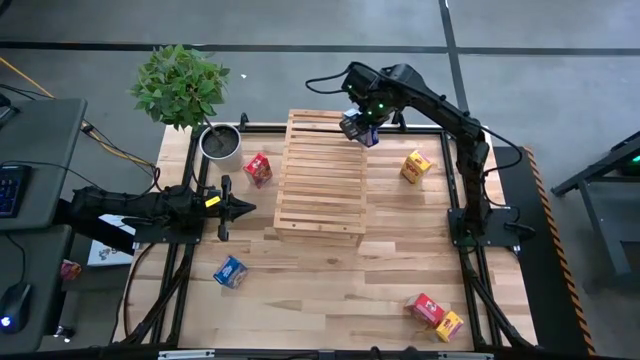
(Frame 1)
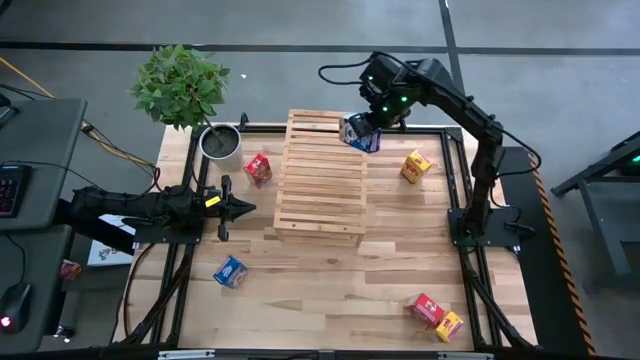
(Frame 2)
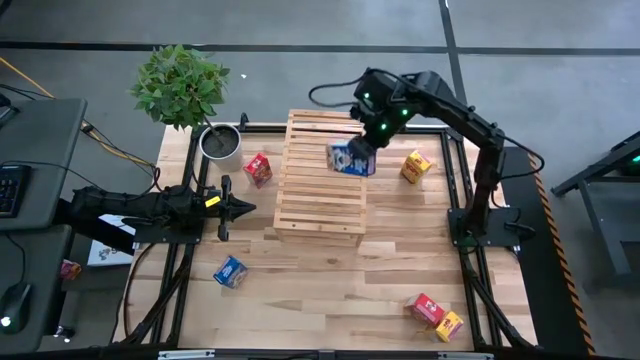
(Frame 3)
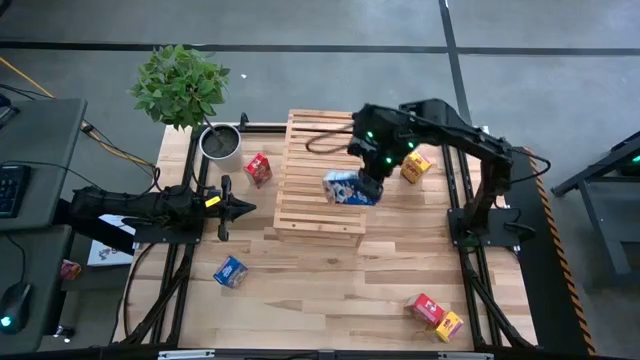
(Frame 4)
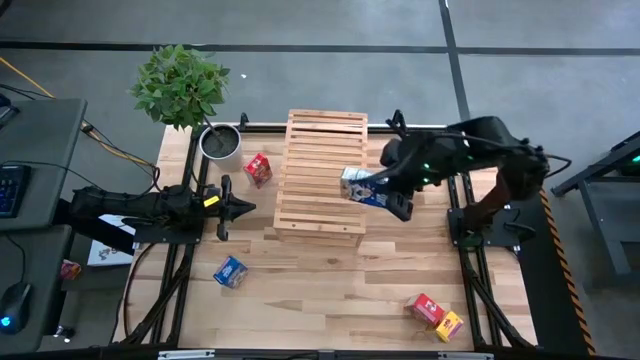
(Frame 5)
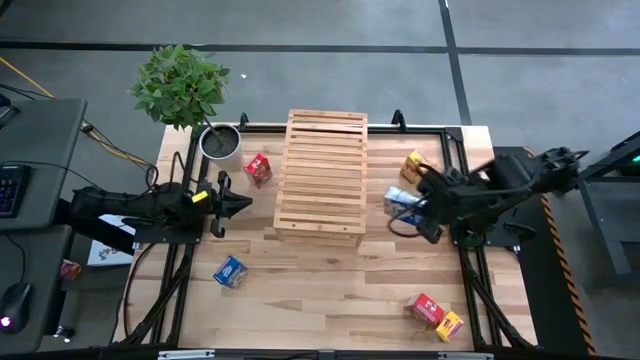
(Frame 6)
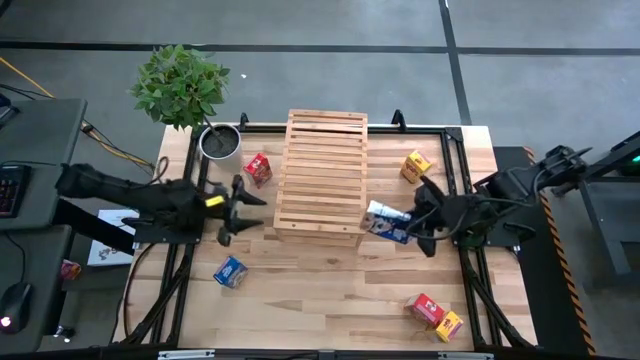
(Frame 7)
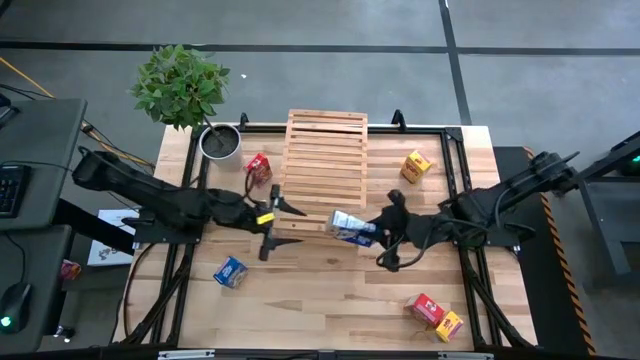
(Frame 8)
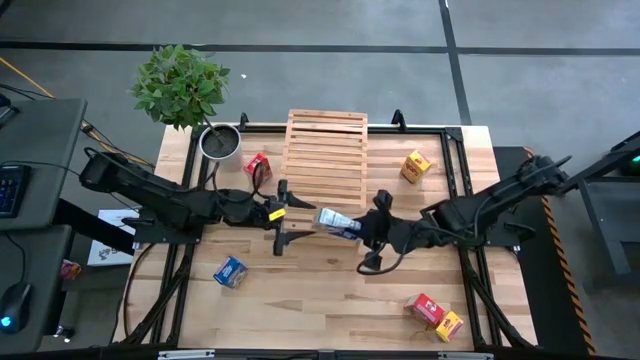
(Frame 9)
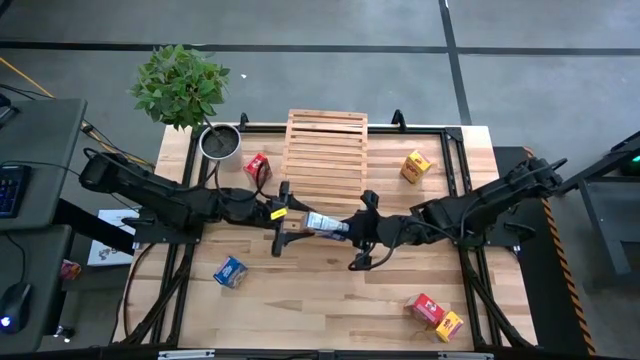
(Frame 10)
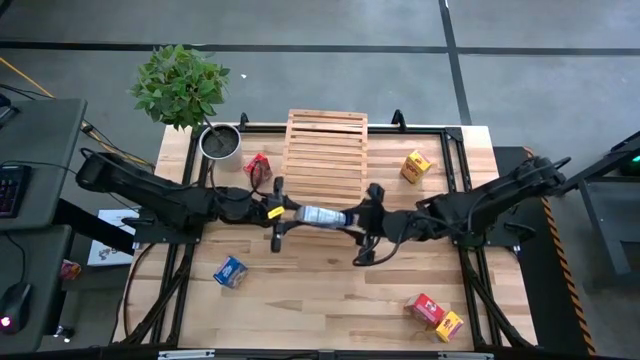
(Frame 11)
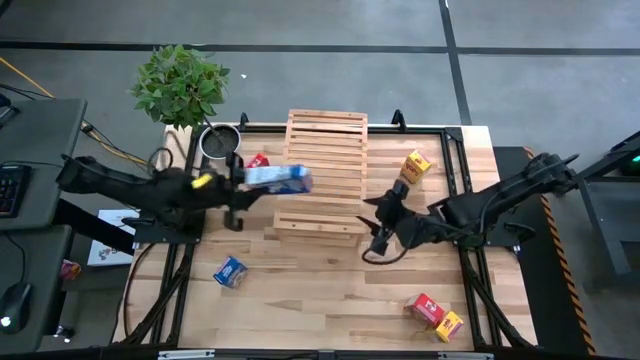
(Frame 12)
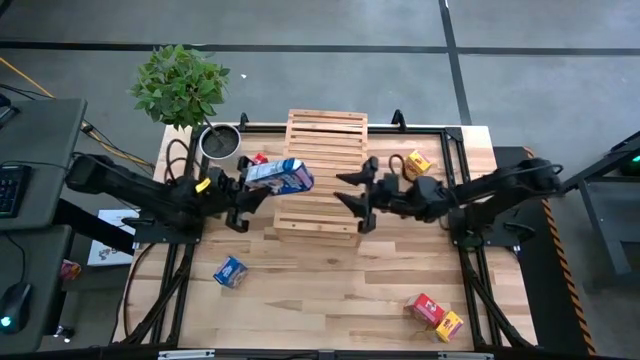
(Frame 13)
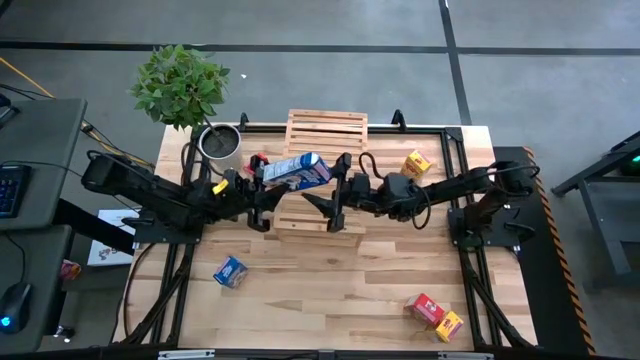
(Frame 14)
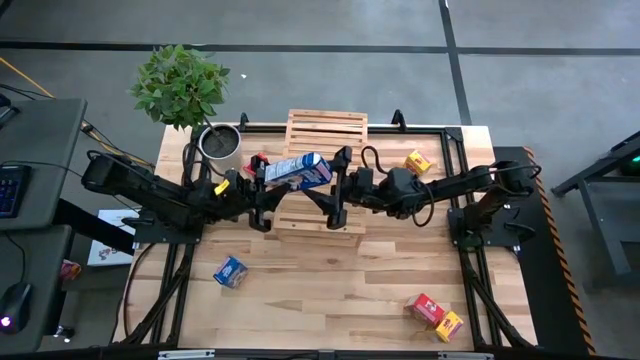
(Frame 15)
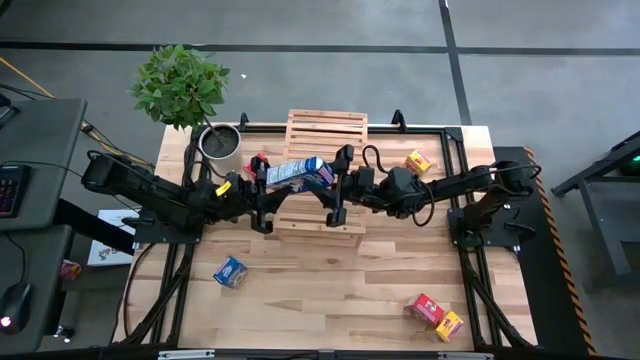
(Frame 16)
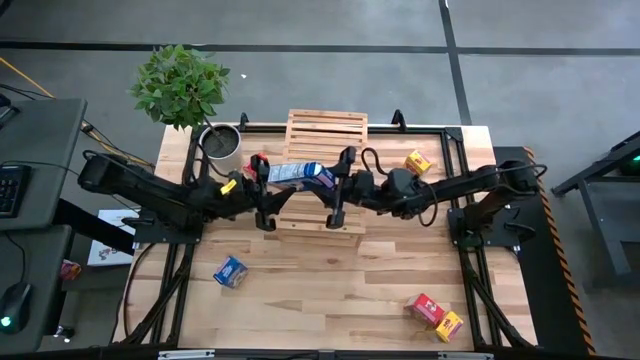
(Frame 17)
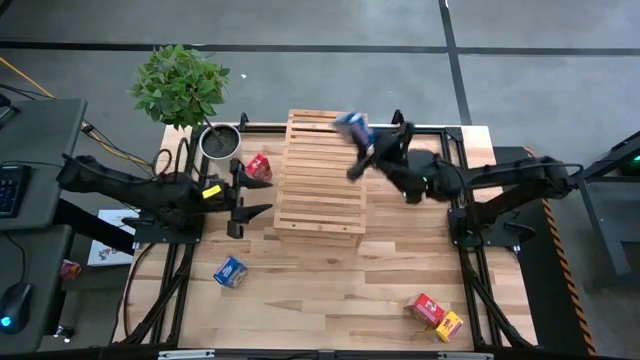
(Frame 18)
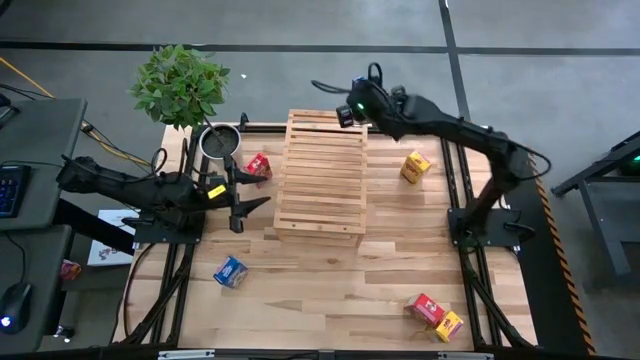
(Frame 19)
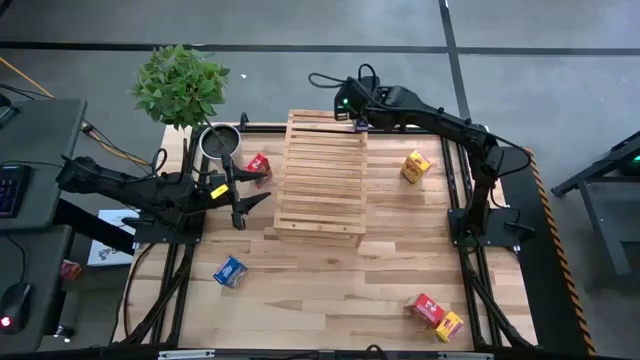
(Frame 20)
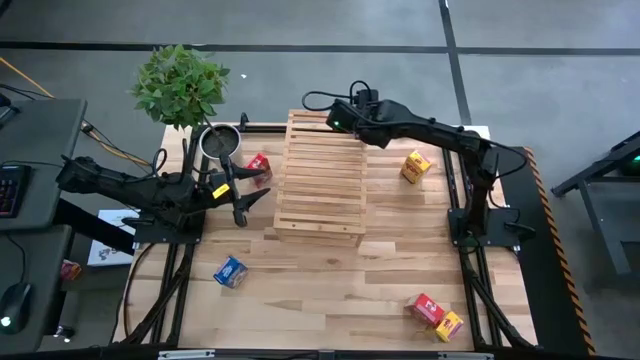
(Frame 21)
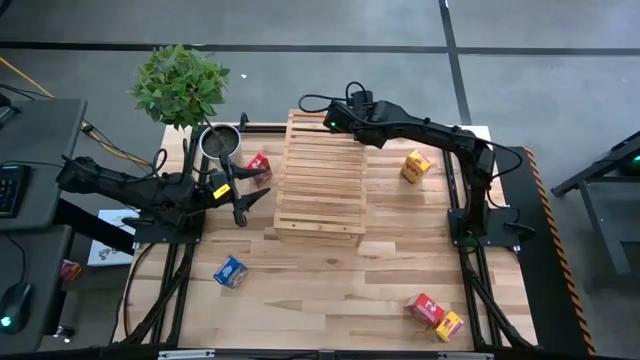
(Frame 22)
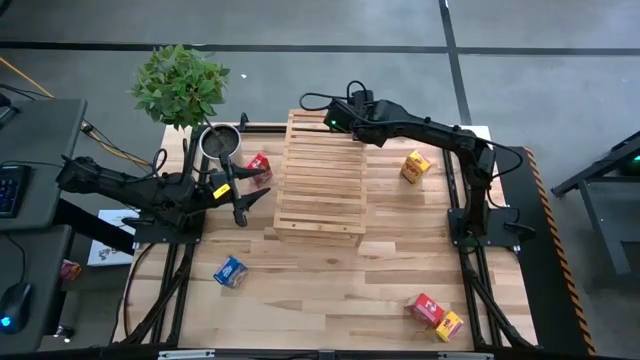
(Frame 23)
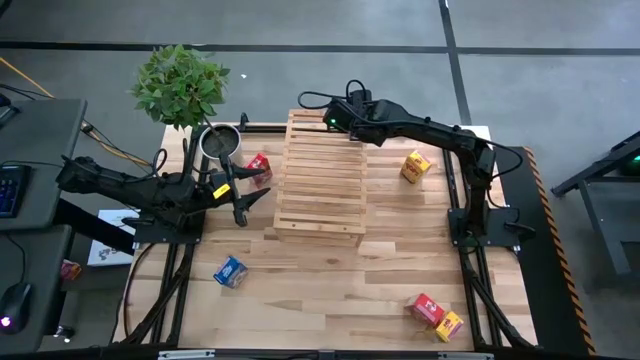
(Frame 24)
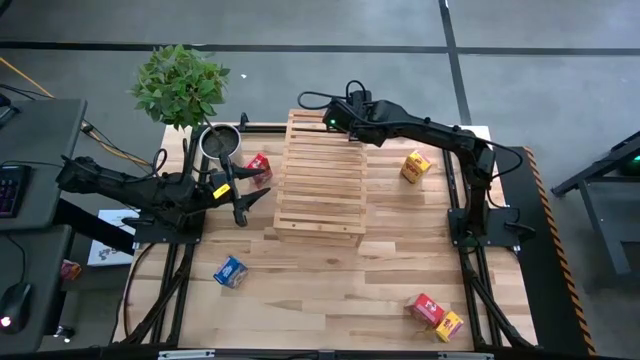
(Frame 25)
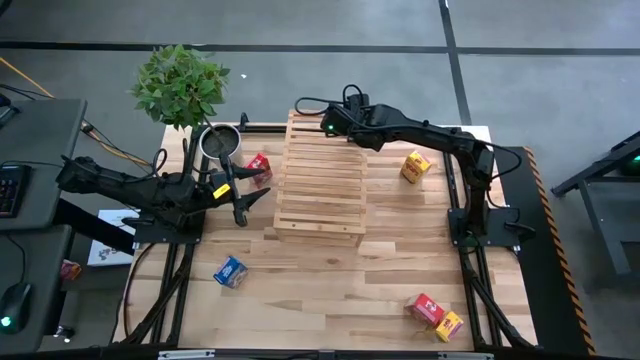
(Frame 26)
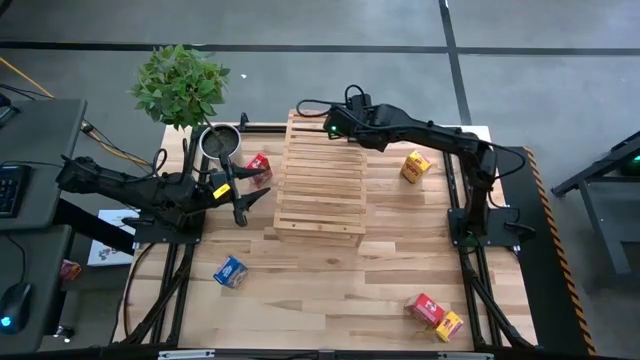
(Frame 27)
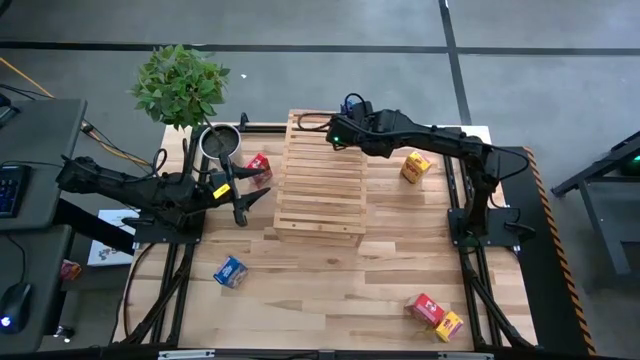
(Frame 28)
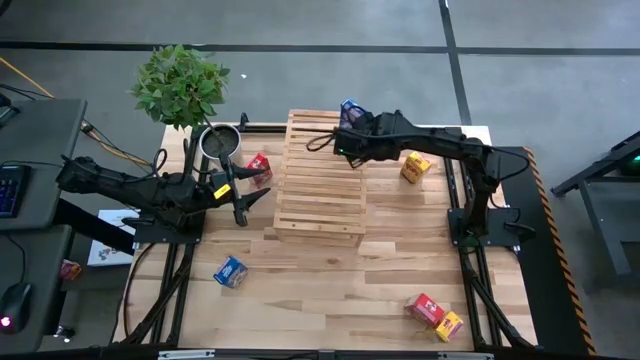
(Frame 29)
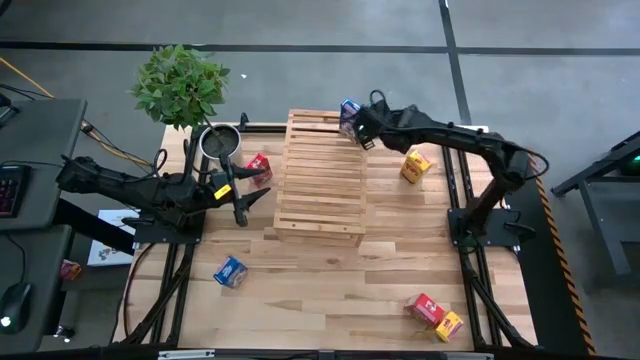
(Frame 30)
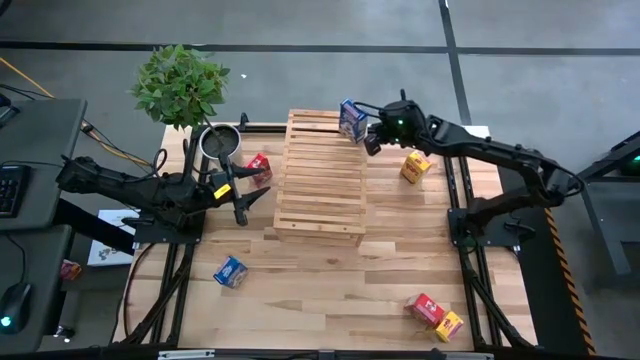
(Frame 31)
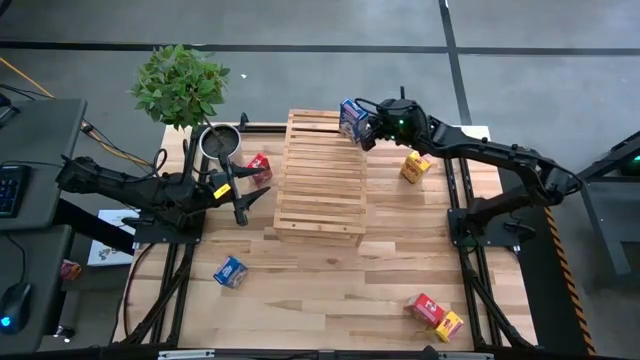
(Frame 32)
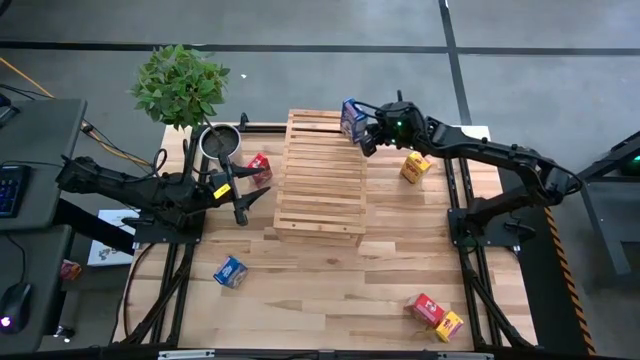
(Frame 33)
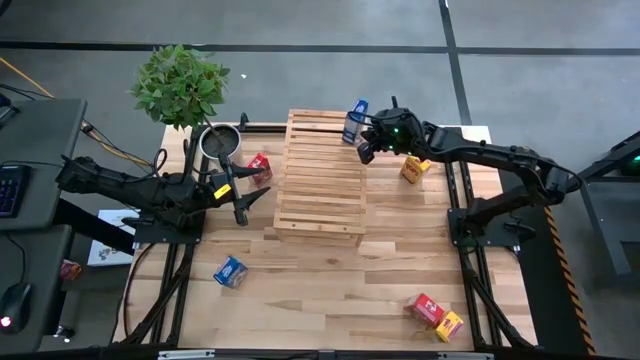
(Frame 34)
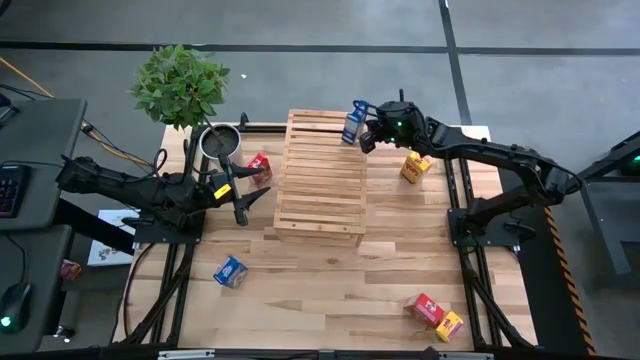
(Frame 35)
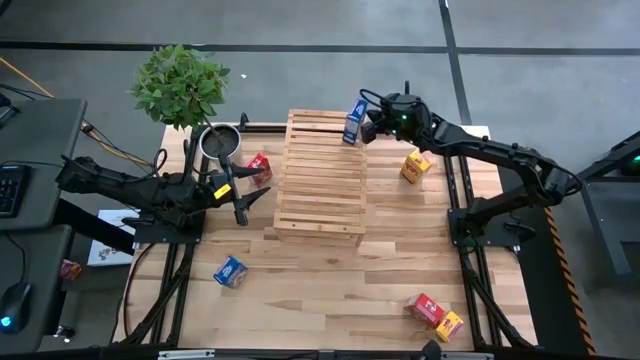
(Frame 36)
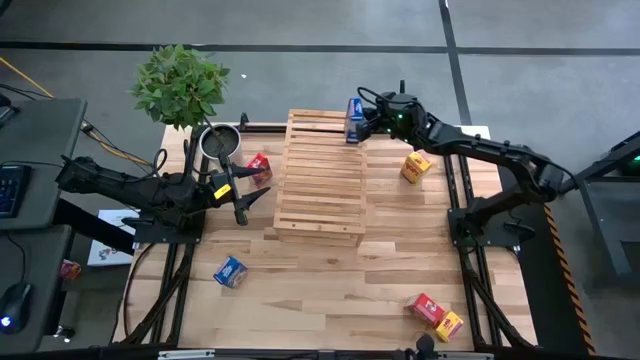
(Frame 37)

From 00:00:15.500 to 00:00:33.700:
Task: Stack cereal on shelf
Put the top blue cereal box on the shelf

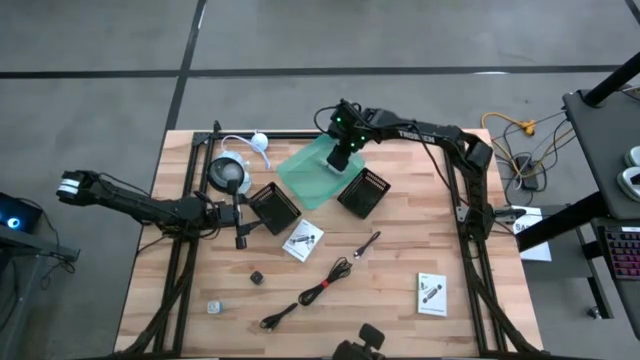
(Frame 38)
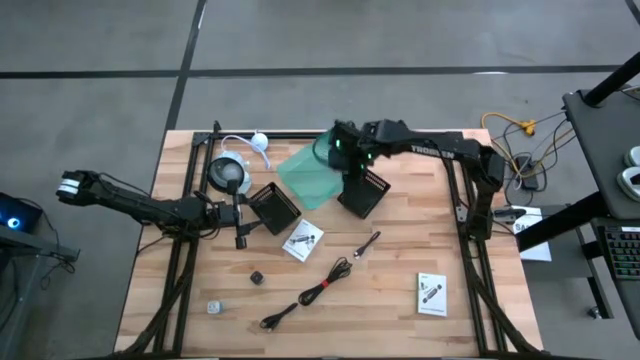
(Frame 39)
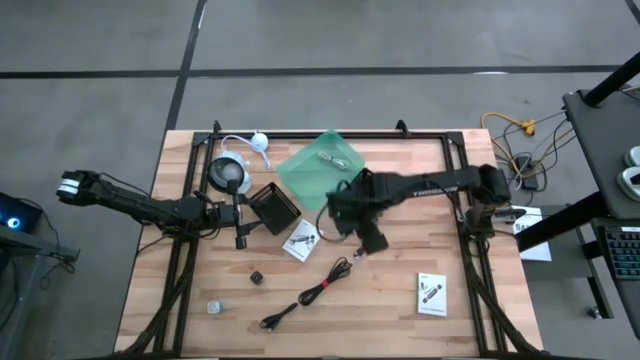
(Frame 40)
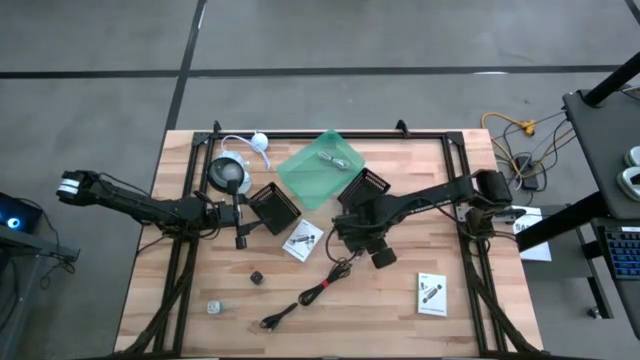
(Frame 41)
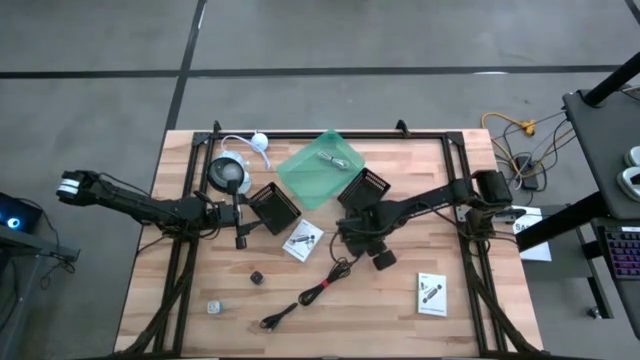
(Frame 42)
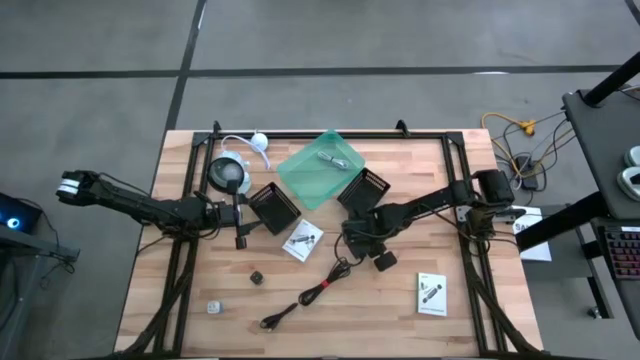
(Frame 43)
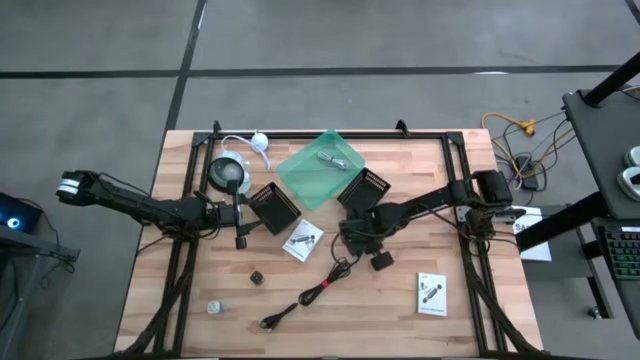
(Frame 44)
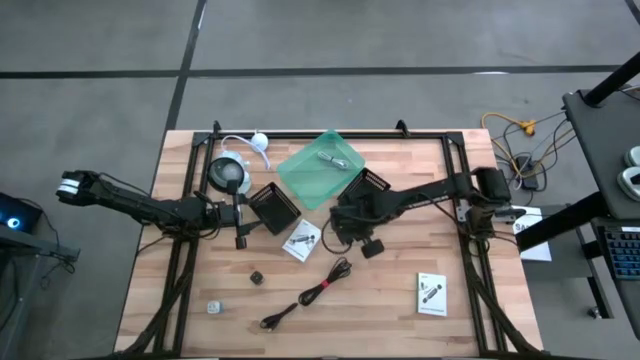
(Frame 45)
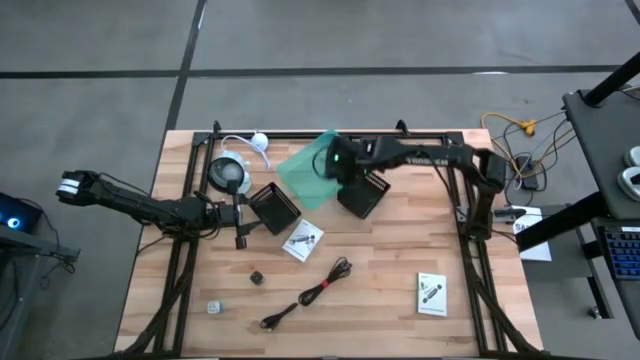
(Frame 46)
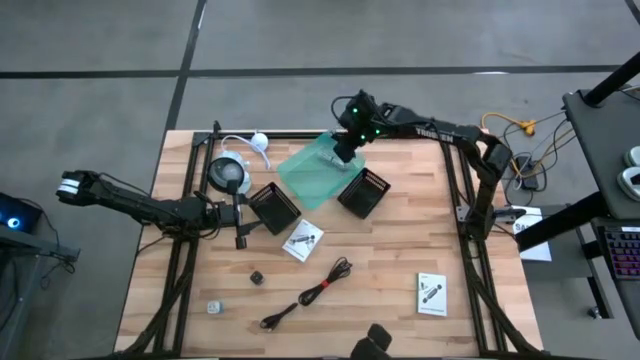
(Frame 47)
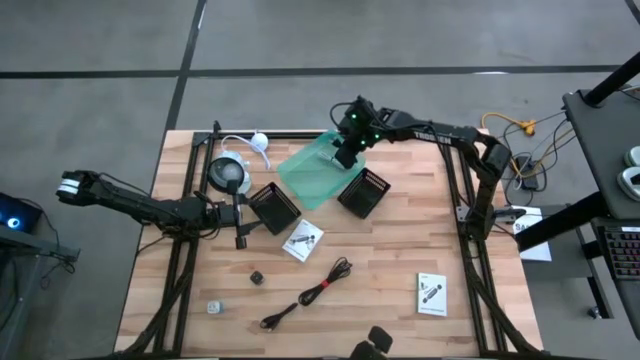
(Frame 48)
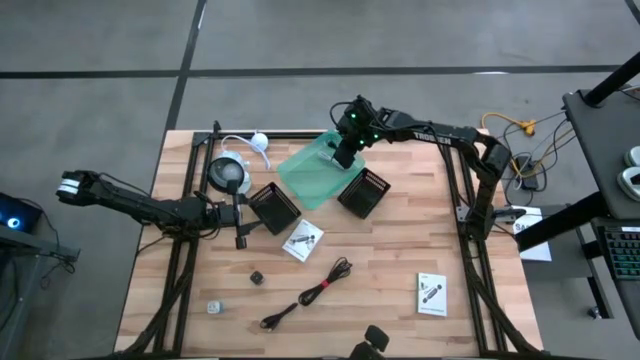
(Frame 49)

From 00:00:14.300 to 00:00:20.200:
Task: Pick and place items into bin
Put the top black charger cable into the green bin
